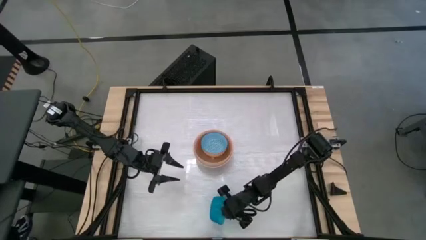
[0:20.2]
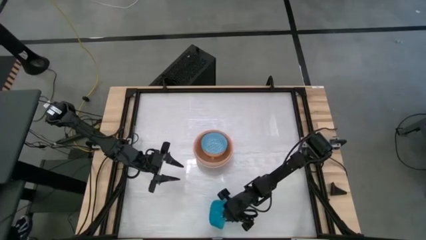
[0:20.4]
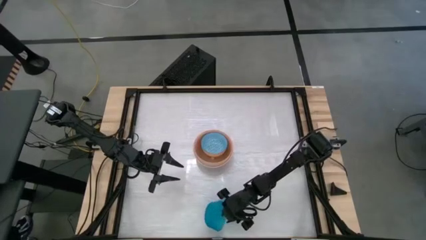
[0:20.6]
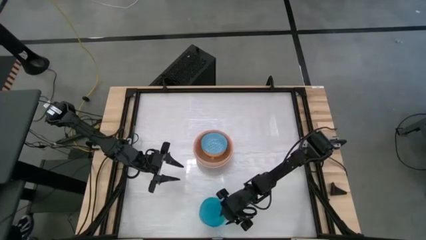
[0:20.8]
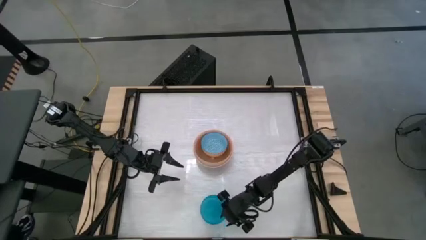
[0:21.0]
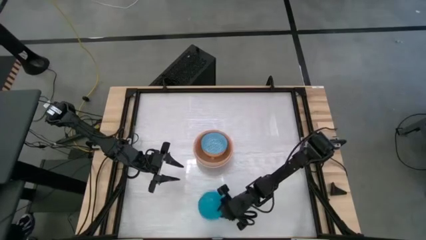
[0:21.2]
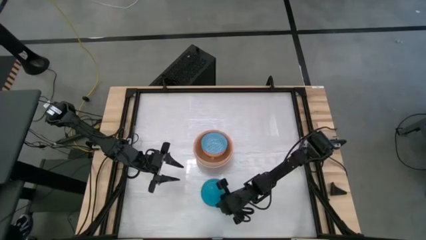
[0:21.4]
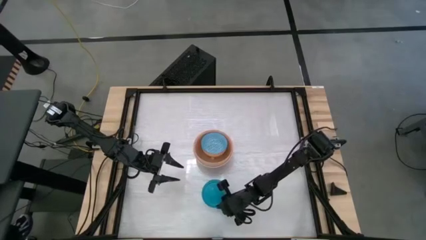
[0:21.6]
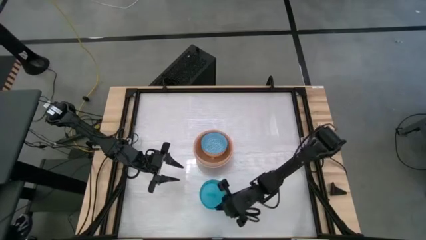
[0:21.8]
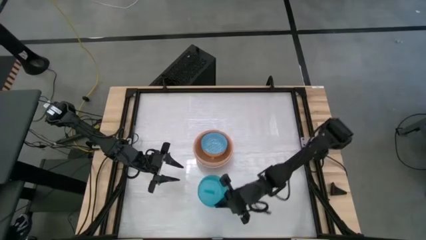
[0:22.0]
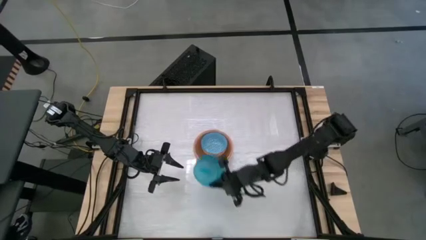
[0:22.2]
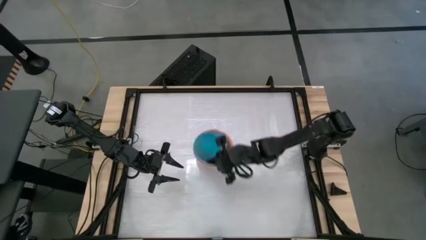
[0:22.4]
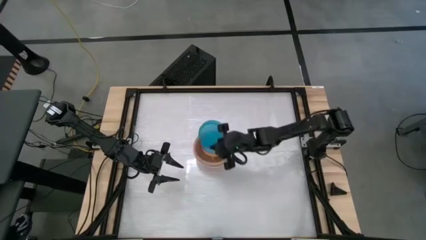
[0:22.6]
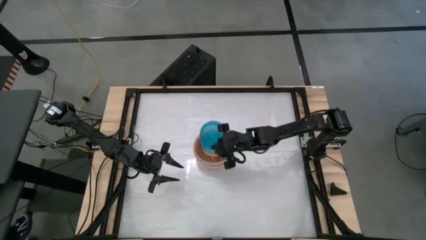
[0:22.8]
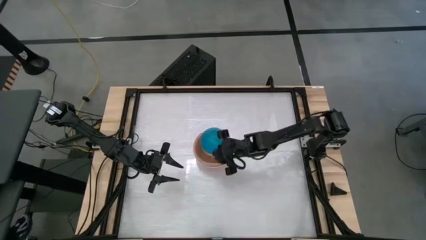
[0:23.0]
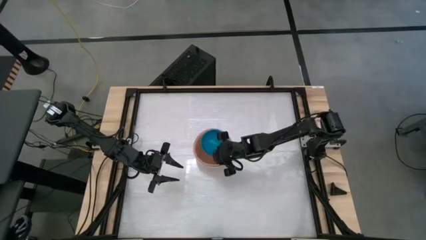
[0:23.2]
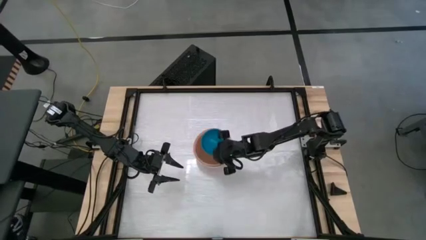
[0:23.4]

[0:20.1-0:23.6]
Stack the blue bowl on top of the blue patterned bowl

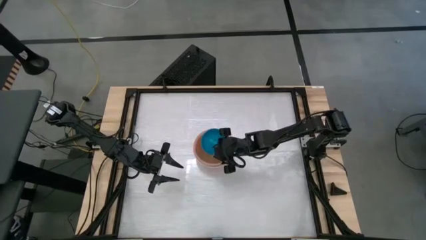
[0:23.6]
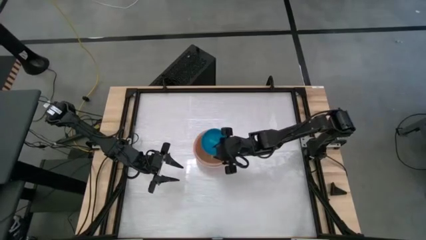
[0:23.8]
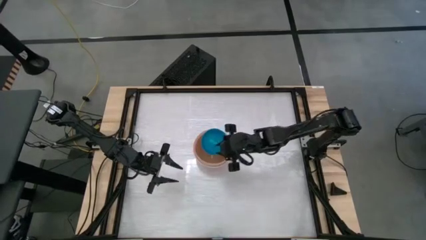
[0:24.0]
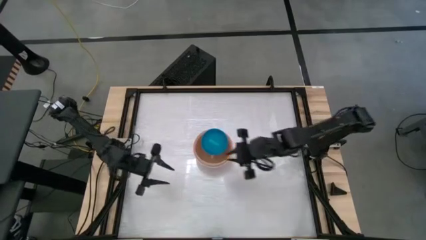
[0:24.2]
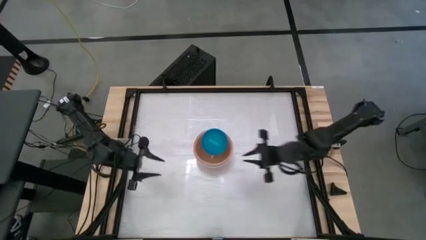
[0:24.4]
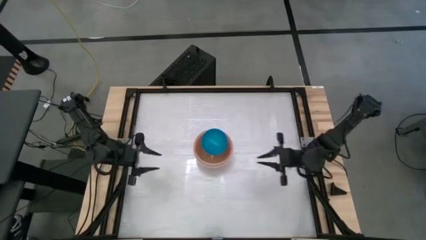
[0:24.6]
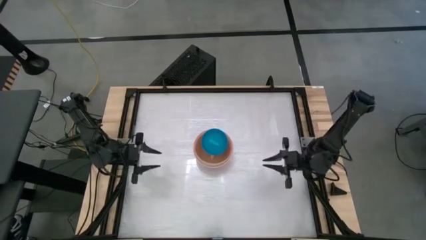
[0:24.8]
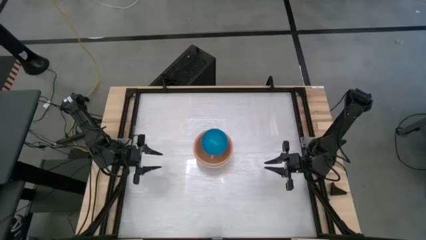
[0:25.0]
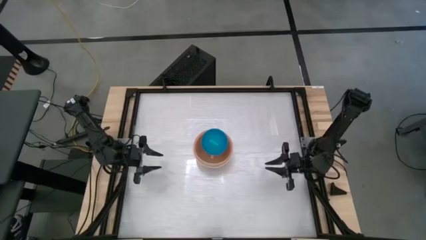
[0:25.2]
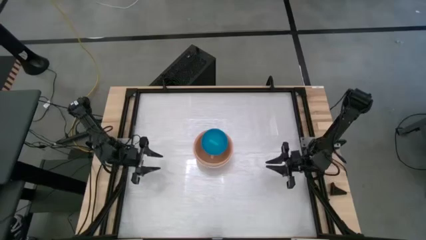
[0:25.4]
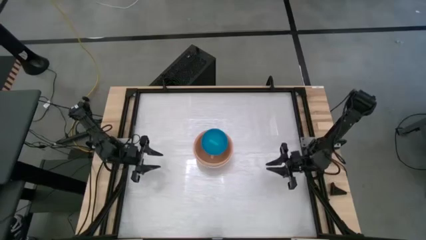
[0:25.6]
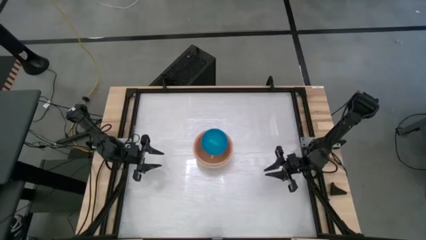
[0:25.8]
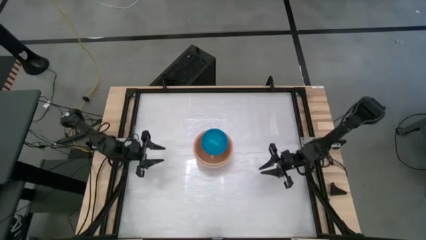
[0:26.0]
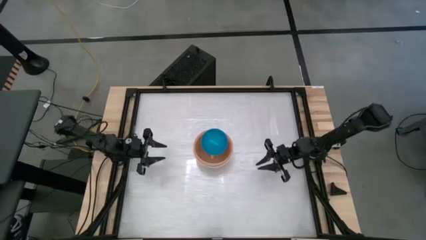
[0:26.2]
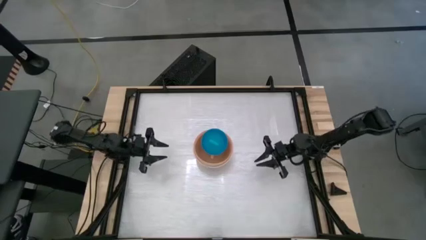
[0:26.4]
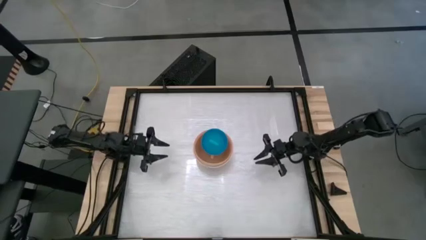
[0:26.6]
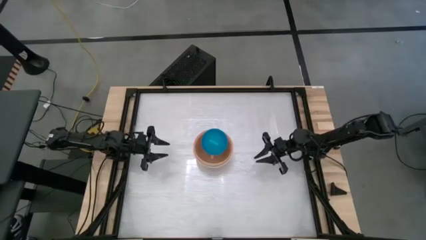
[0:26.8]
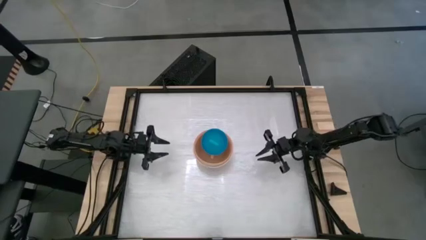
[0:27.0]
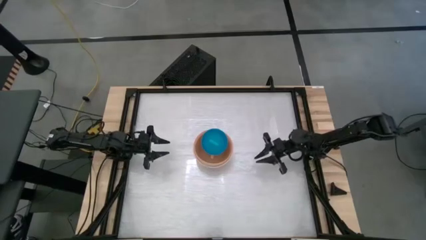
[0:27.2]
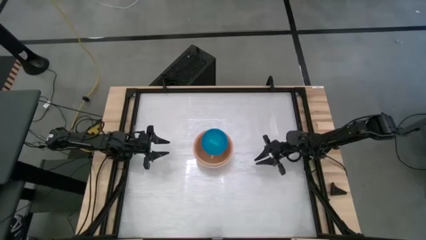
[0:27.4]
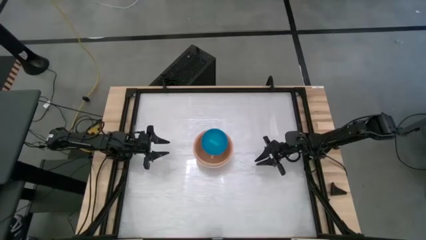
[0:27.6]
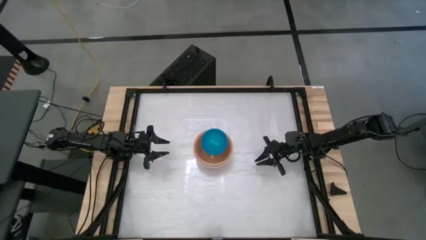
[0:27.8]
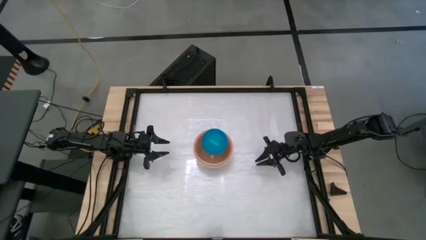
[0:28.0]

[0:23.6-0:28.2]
Return to Home Position

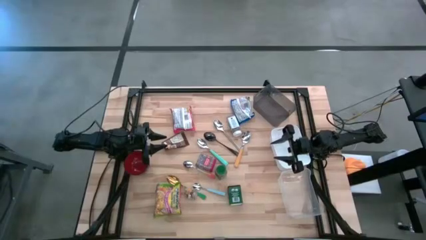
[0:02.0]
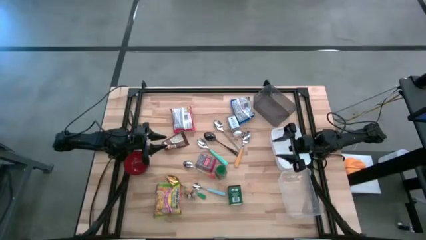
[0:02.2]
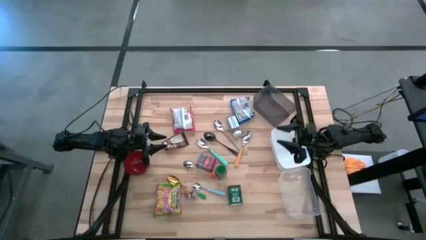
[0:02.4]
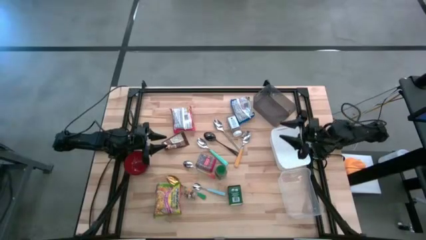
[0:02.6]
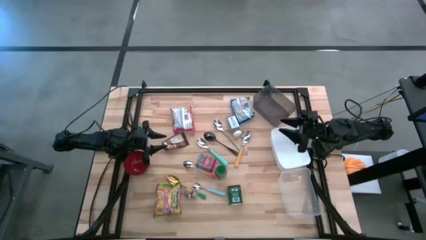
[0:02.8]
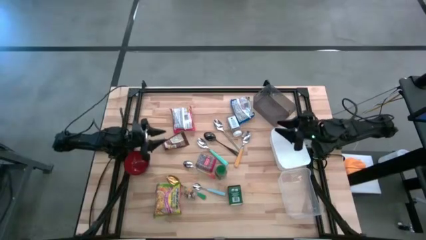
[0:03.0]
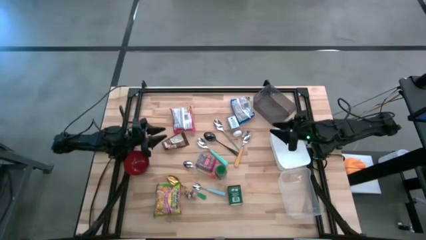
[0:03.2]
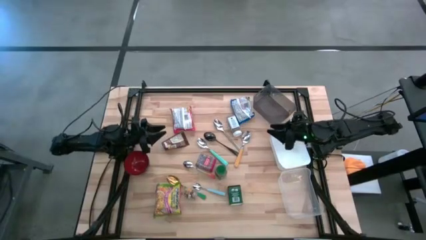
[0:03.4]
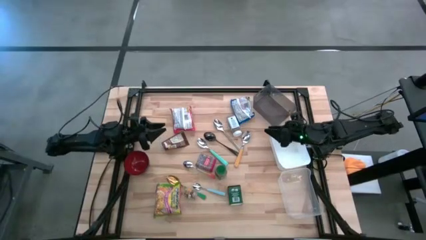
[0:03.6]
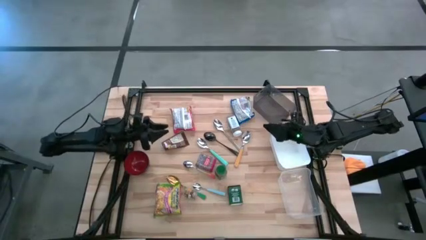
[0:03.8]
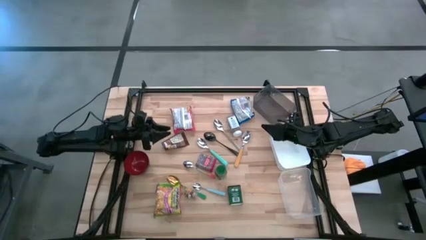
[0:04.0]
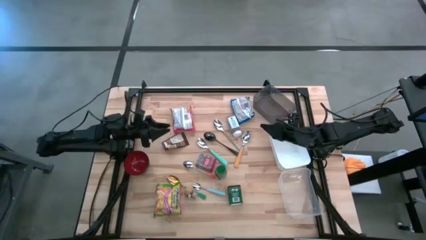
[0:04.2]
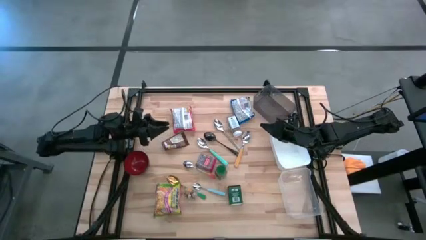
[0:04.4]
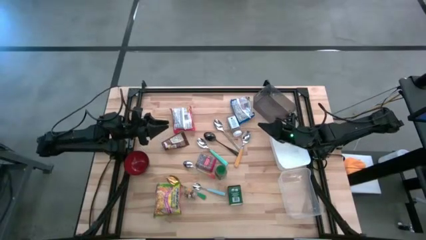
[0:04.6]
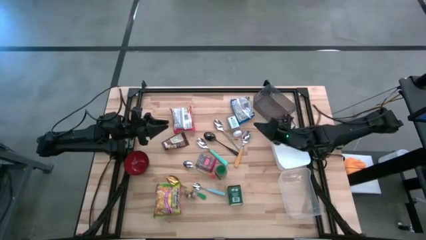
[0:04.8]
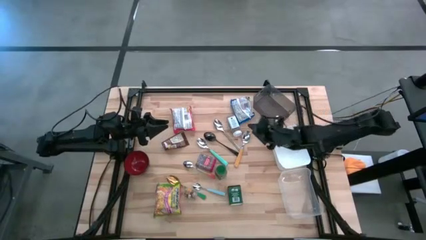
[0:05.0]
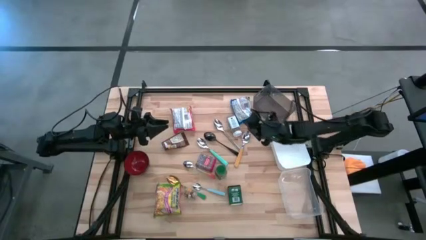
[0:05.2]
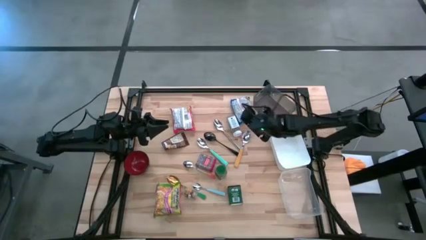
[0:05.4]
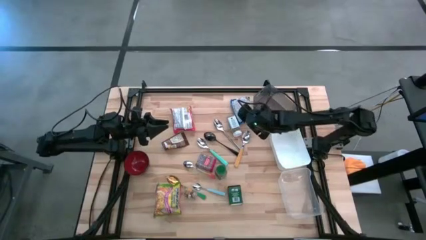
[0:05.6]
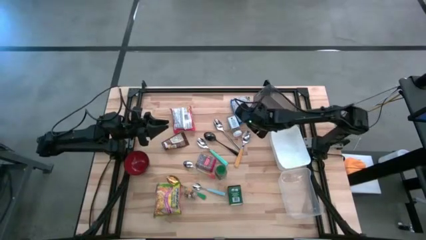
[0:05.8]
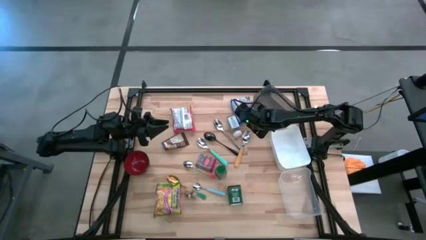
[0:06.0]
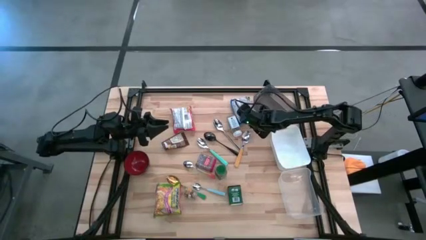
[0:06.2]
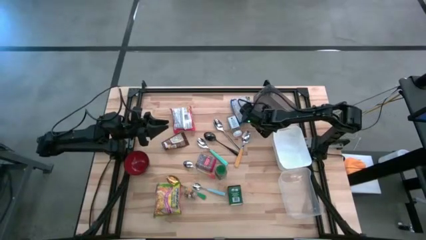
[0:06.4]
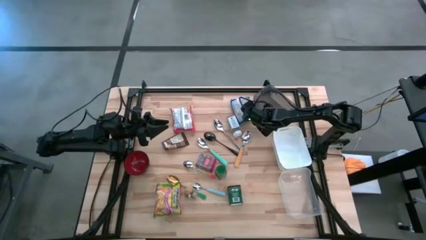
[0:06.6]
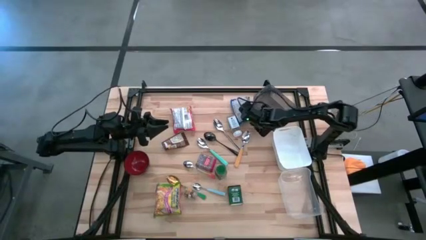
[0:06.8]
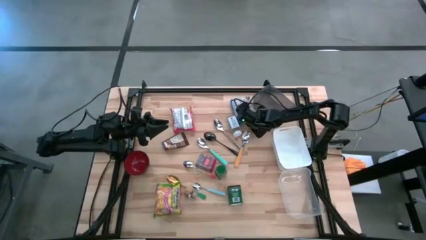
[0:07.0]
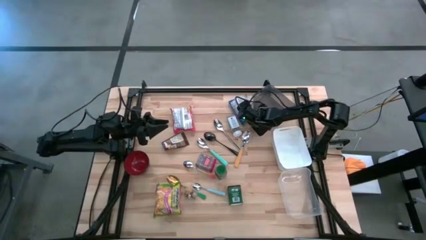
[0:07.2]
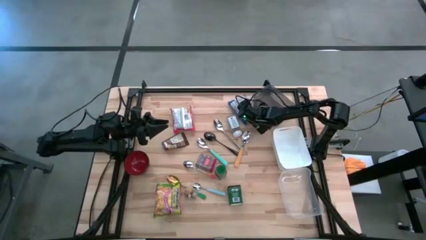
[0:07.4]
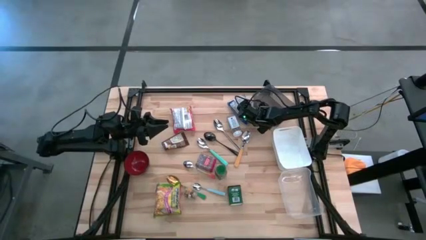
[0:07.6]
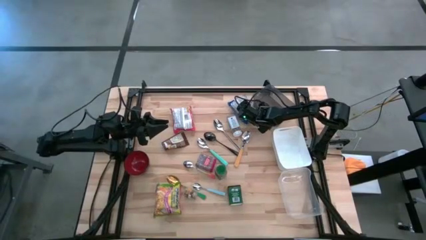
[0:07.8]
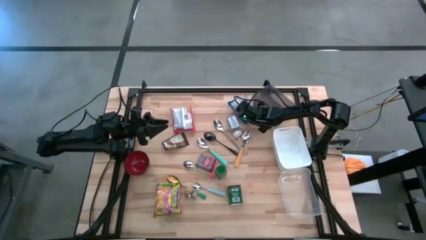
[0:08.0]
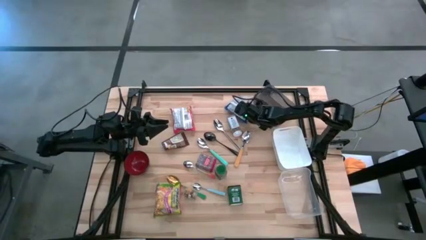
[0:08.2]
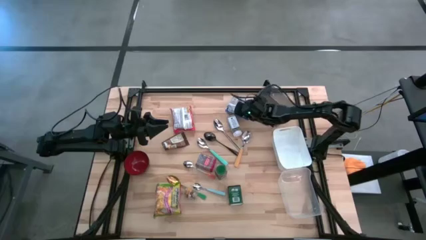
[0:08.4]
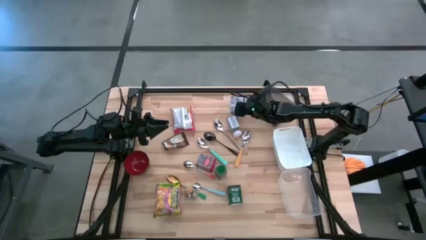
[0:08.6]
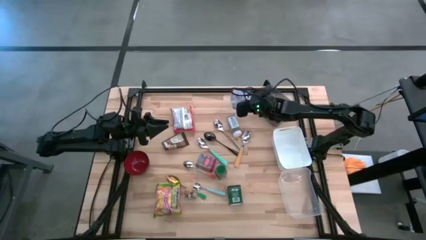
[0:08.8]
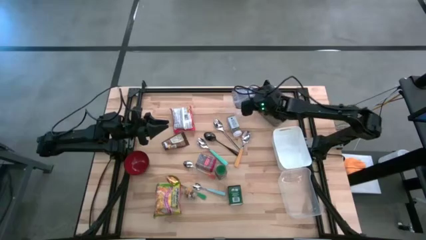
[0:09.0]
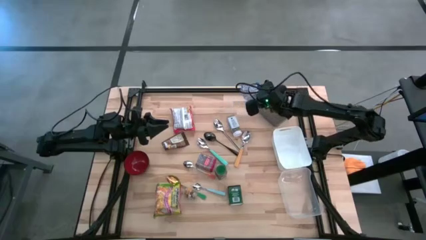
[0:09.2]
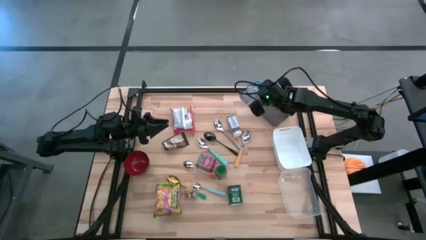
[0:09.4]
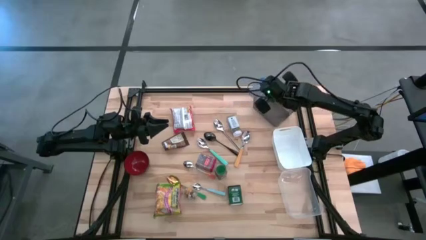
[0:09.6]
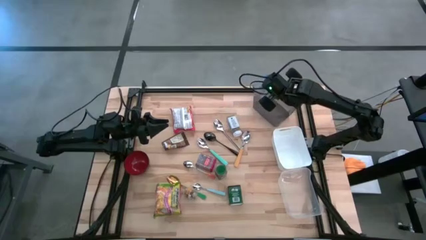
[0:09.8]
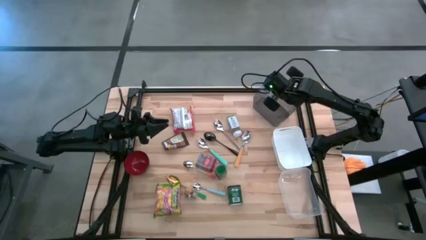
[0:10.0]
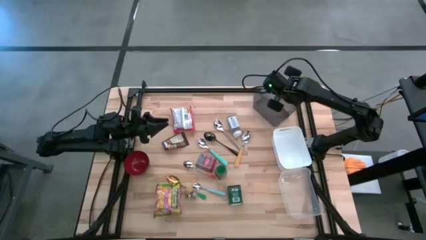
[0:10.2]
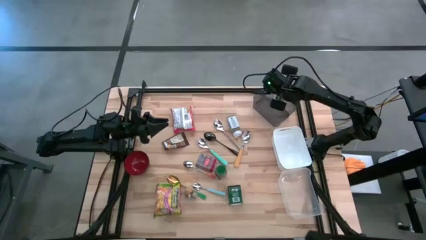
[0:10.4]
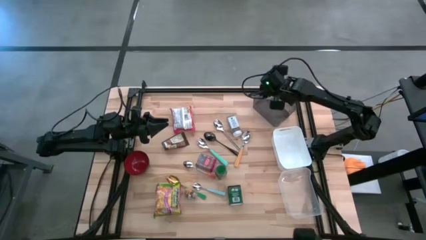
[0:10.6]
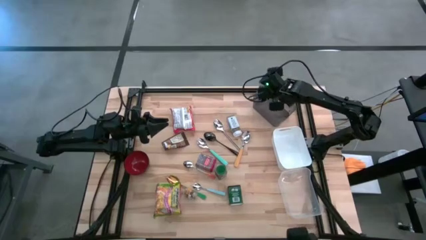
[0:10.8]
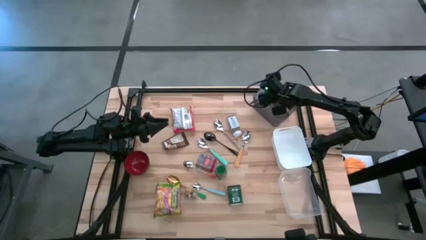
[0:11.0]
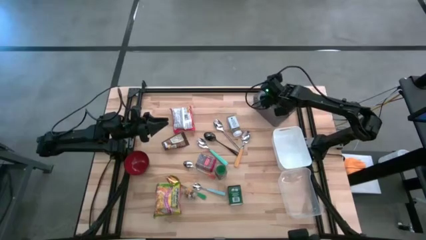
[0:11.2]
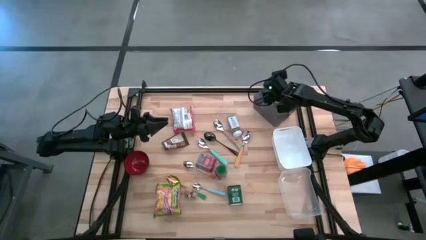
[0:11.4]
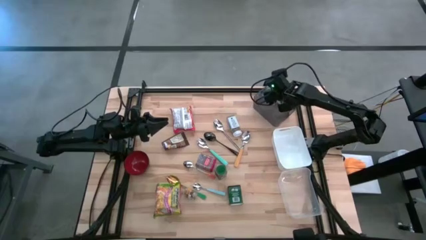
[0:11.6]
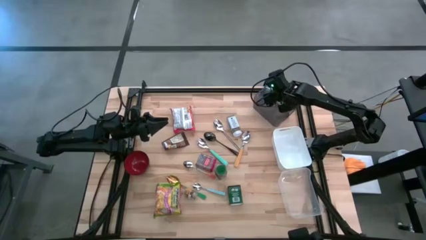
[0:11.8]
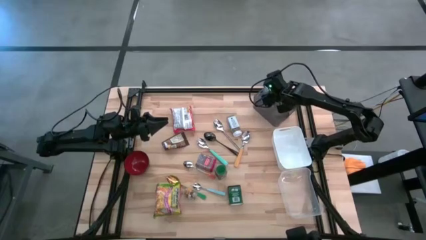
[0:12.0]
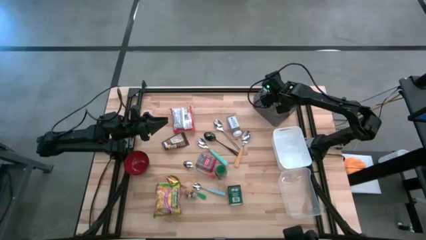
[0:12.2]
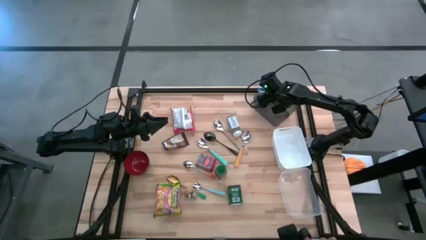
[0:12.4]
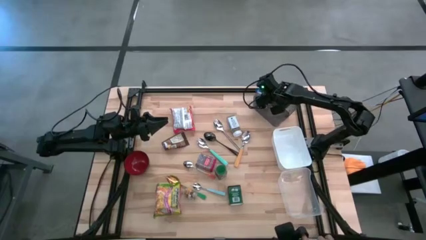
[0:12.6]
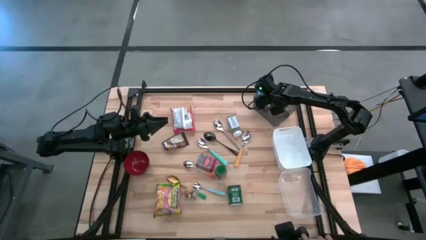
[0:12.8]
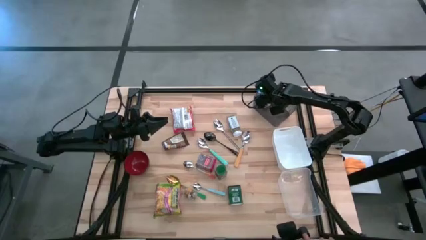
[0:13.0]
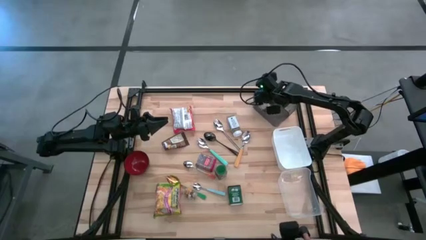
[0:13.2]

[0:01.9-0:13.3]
Put the blue noodle pack into the black bin
